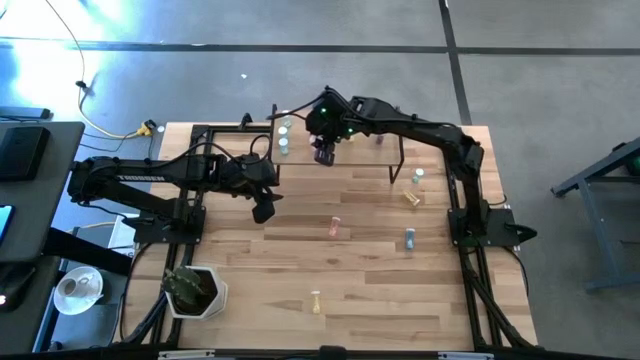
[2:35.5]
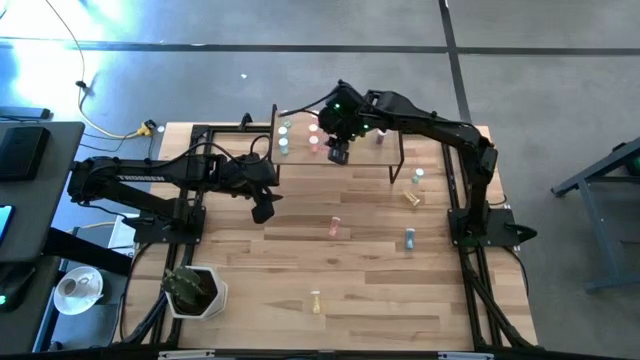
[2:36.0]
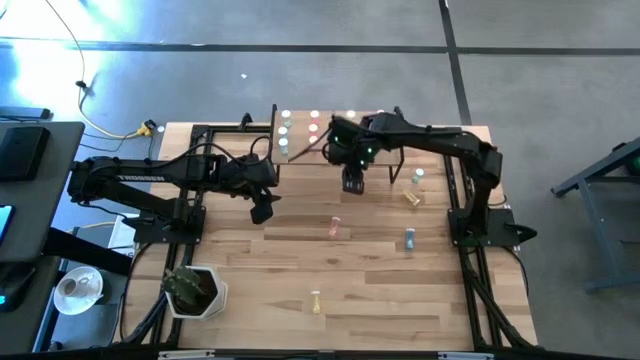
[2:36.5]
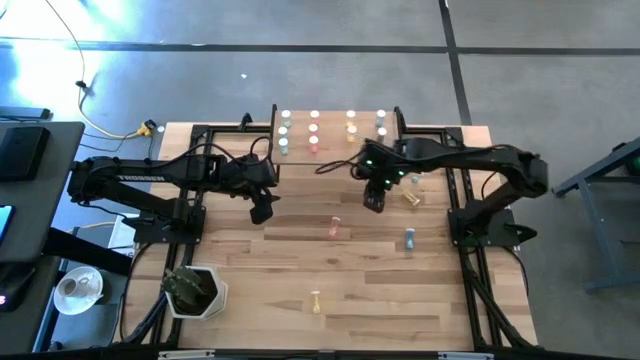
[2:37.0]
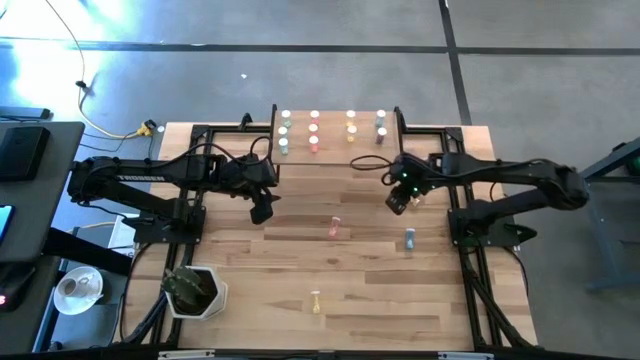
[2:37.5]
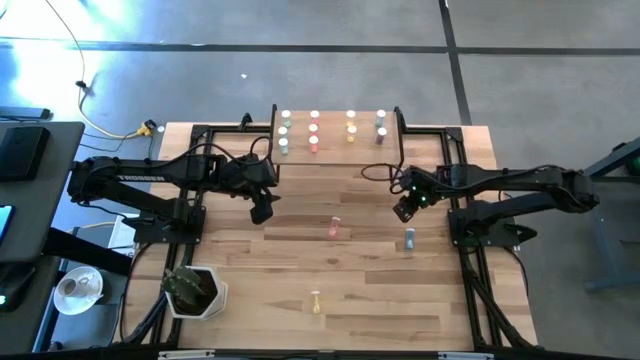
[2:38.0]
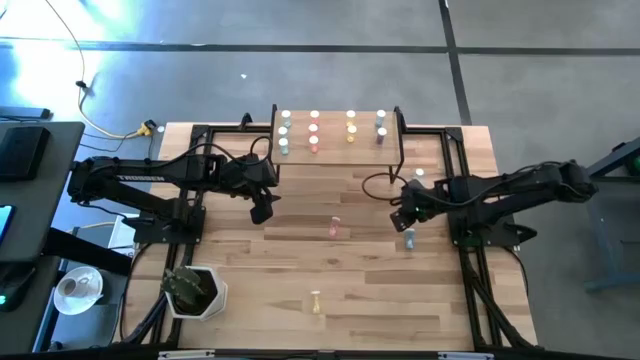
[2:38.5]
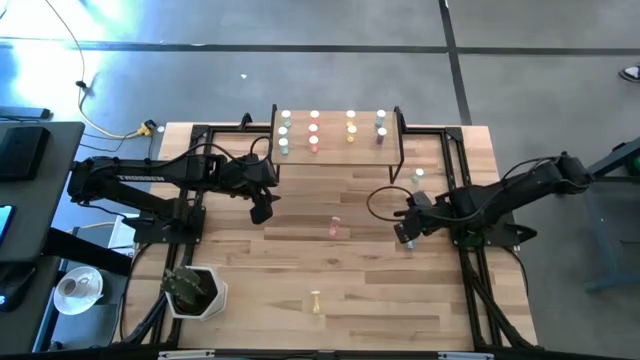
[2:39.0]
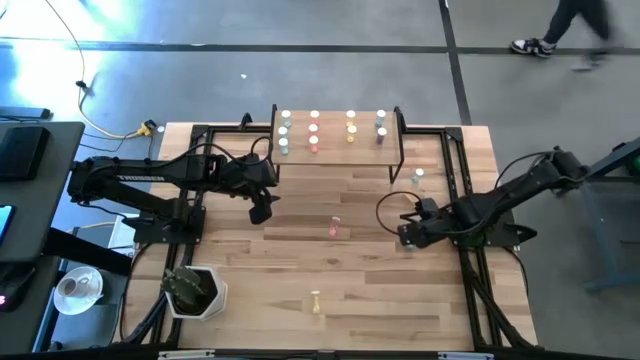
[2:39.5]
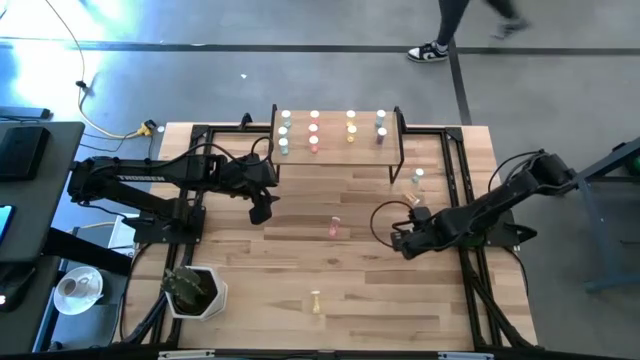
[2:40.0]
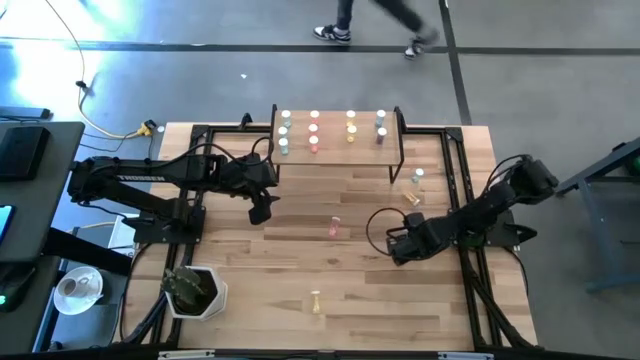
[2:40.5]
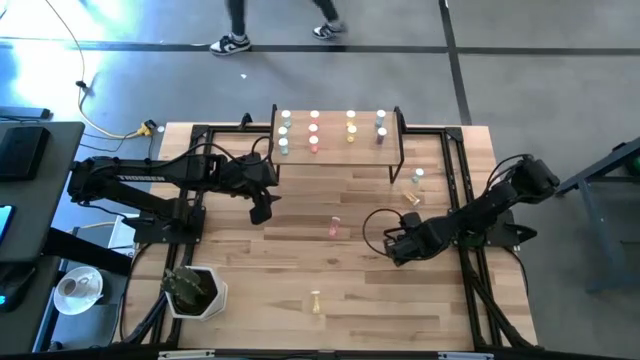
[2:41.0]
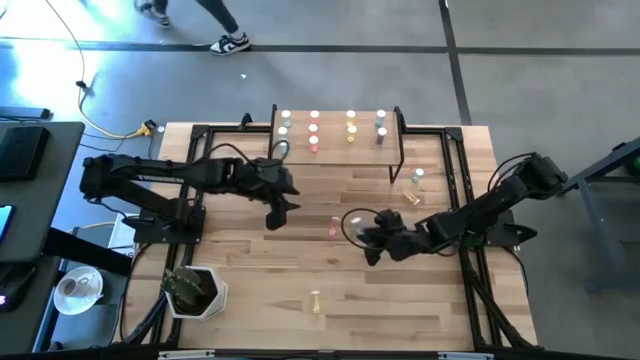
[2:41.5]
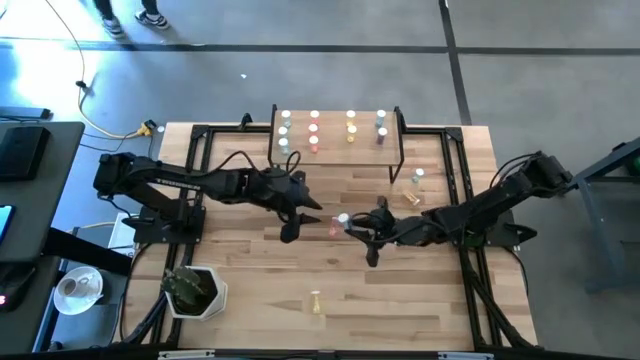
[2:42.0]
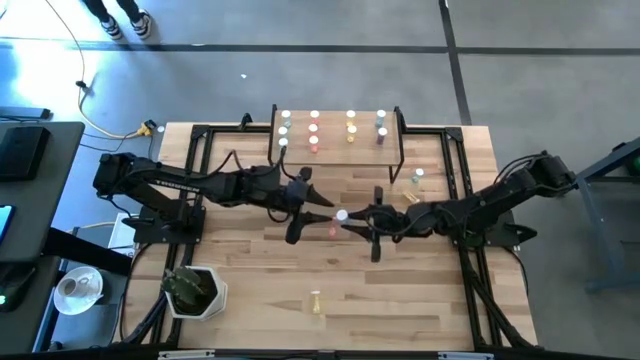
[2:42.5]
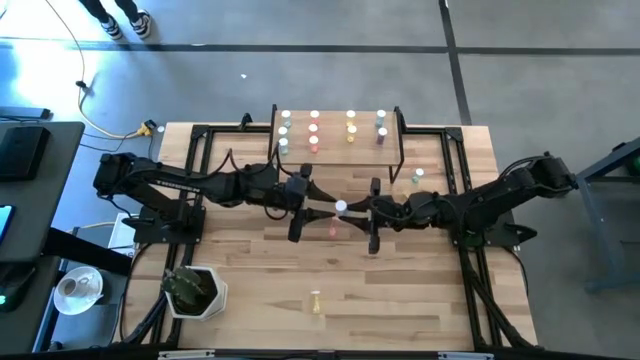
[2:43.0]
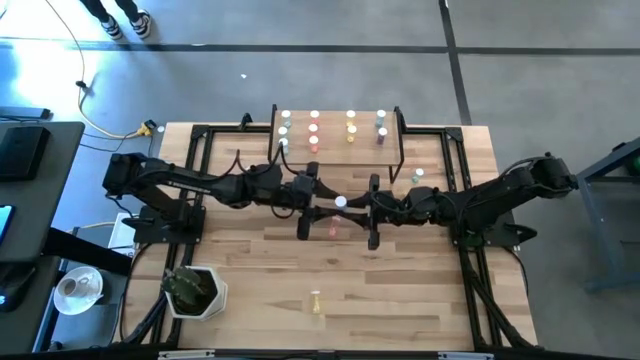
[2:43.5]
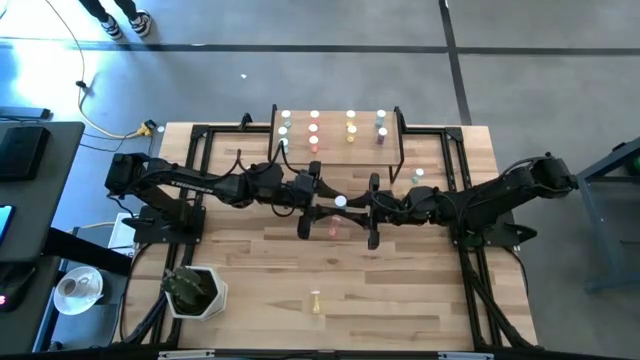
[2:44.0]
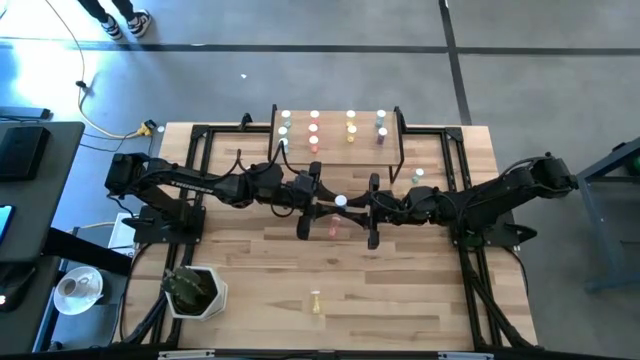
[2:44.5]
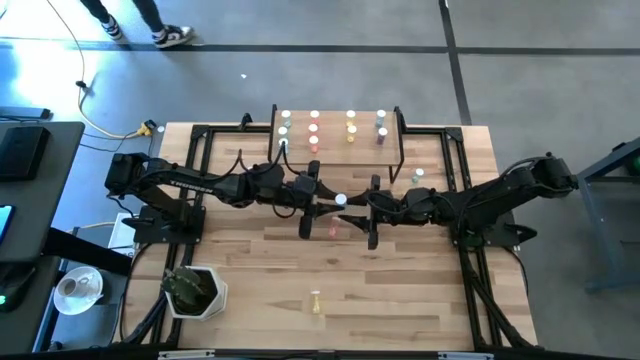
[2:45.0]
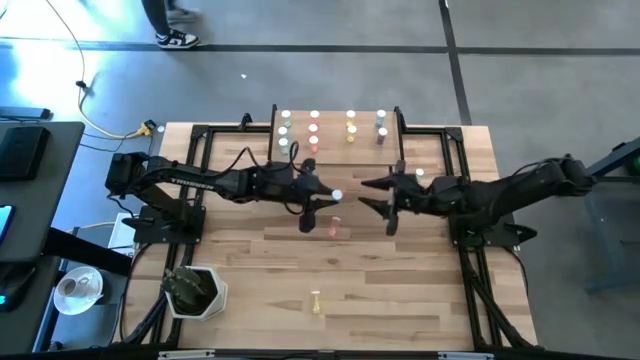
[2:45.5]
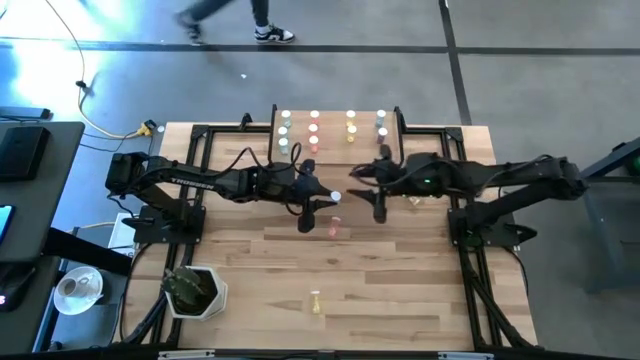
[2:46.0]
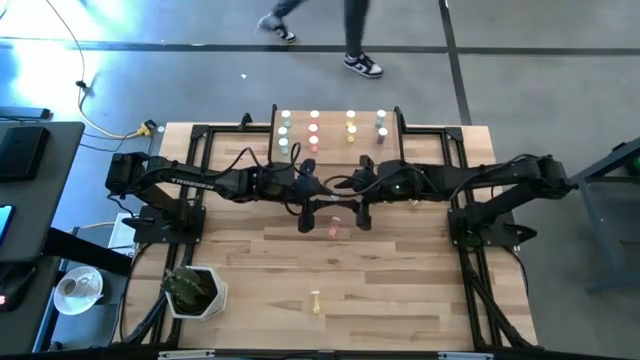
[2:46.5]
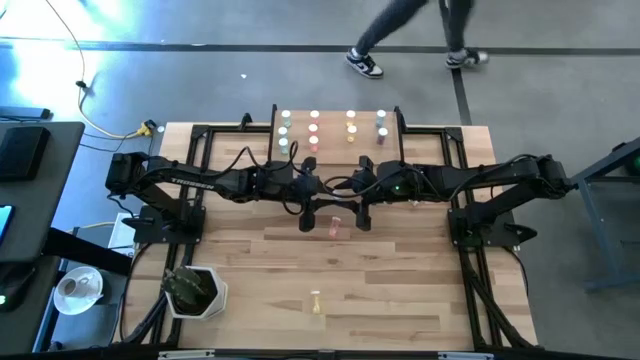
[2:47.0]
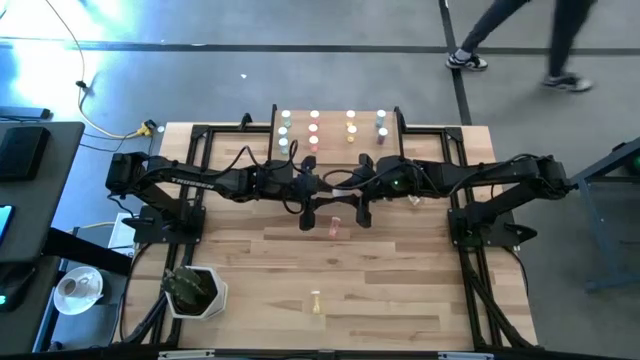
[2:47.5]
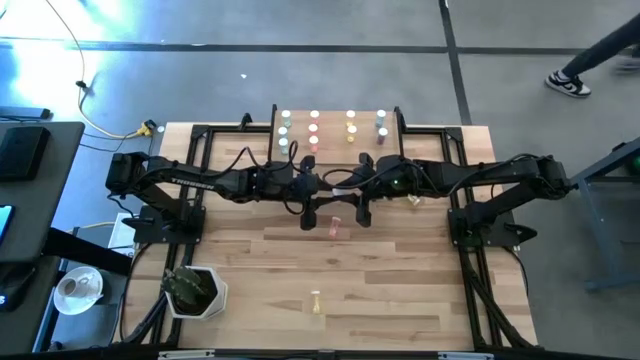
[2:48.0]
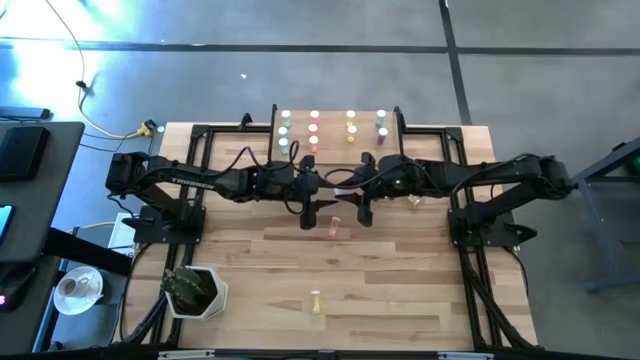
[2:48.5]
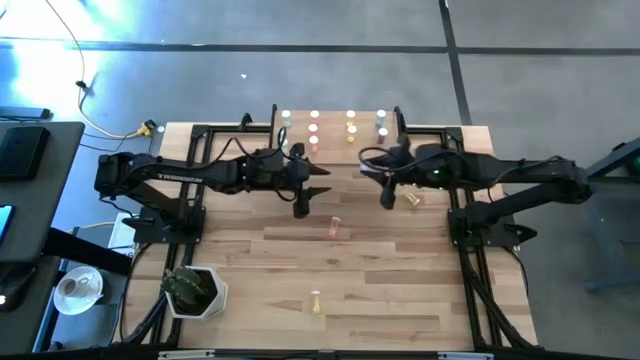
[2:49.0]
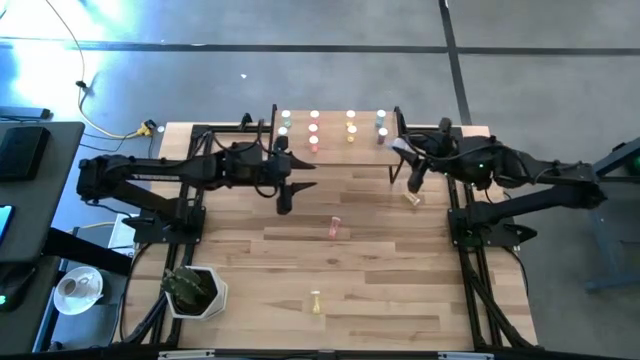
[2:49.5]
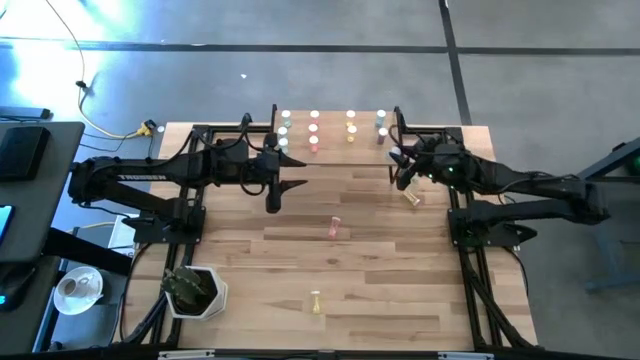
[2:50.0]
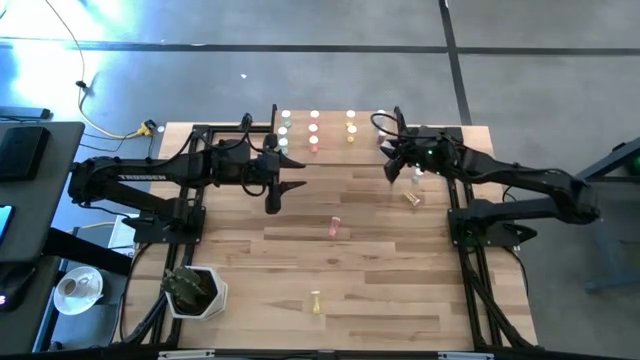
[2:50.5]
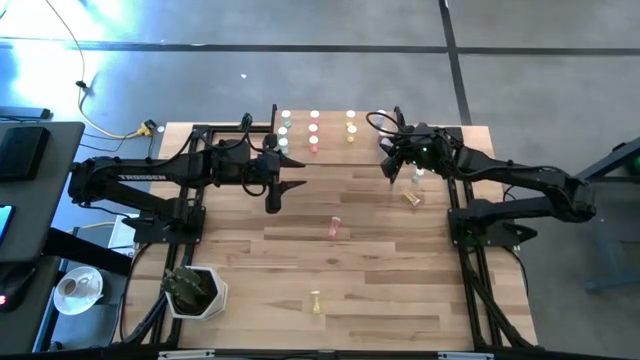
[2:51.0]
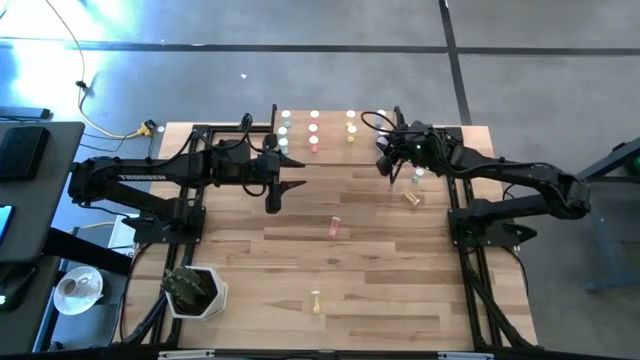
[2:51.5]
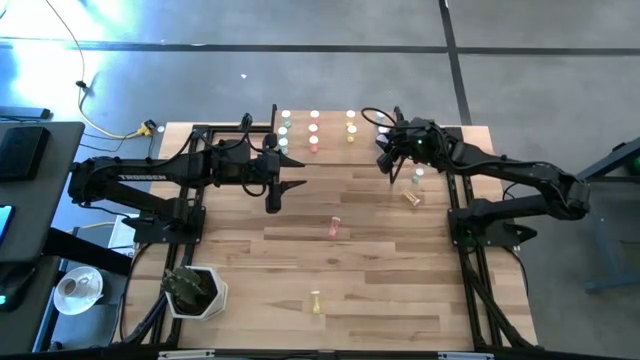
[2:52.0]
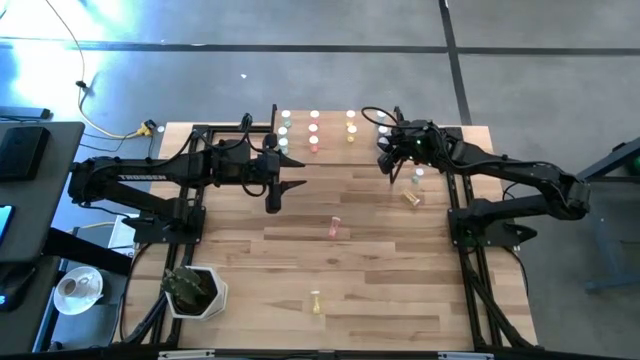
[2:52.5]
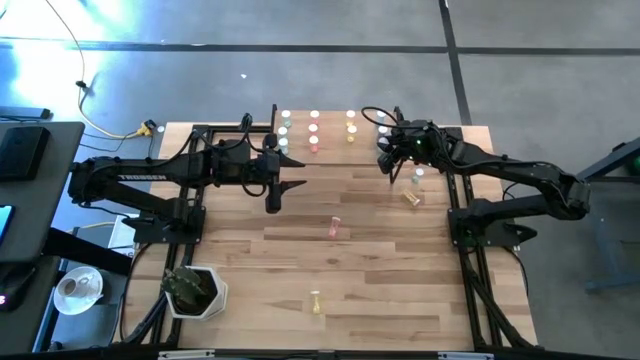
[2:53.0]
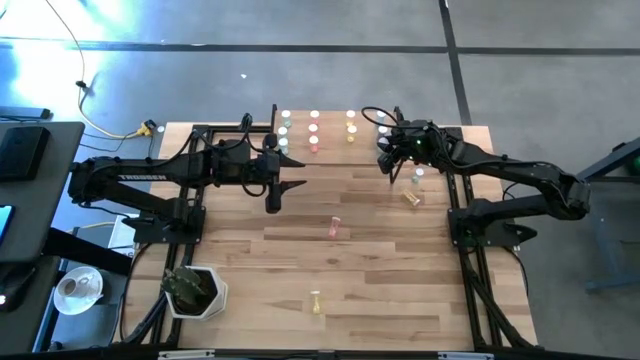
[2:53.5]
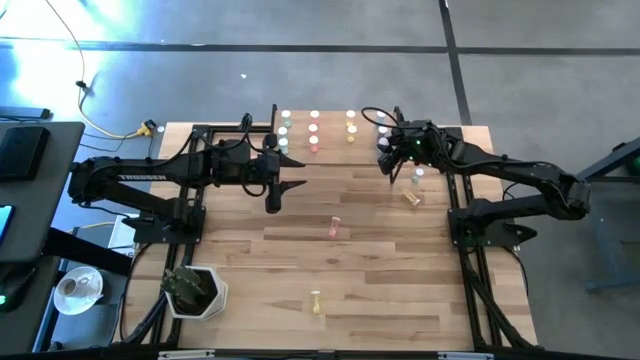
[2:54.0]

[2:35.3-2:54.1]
Task: Pick and place medicine bottles onto shelf by color
Put the blue pill bottle on the shelf

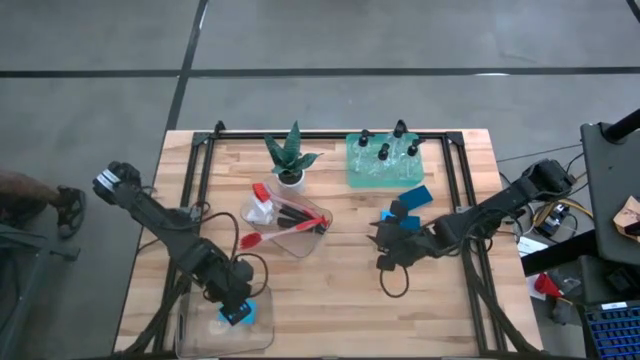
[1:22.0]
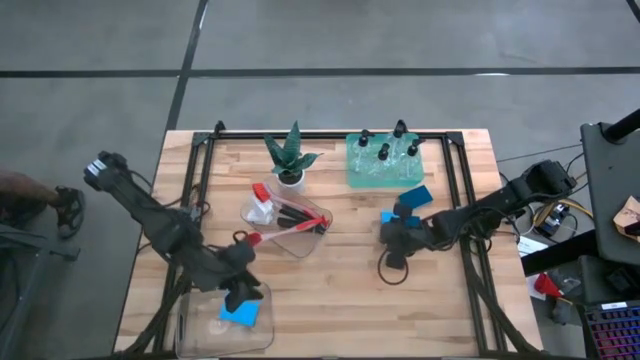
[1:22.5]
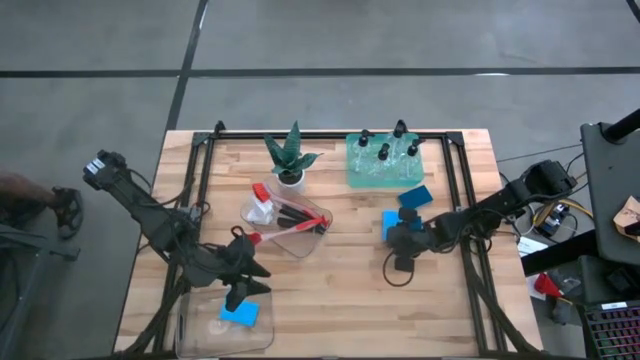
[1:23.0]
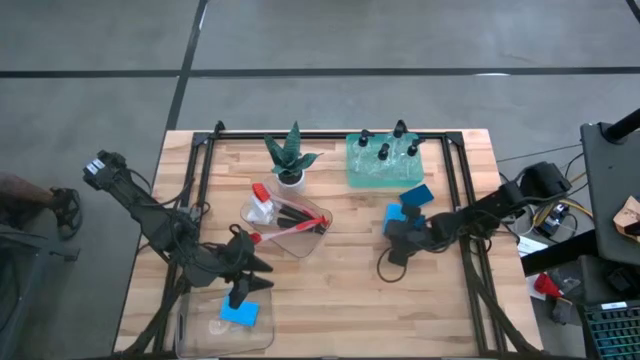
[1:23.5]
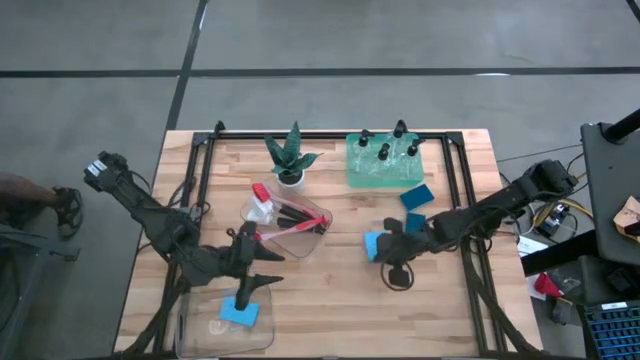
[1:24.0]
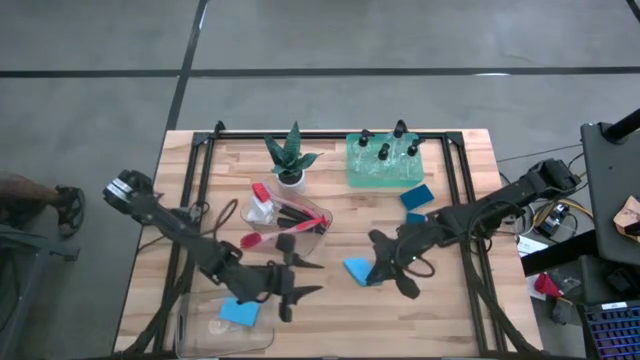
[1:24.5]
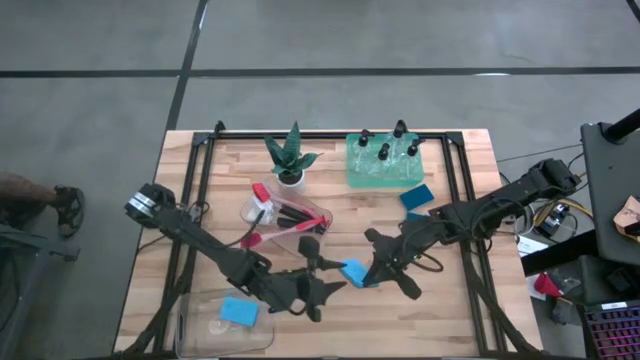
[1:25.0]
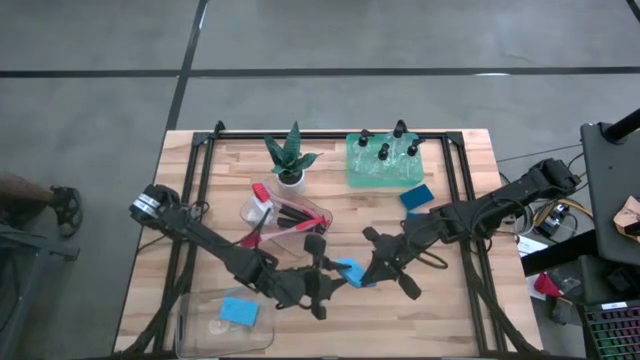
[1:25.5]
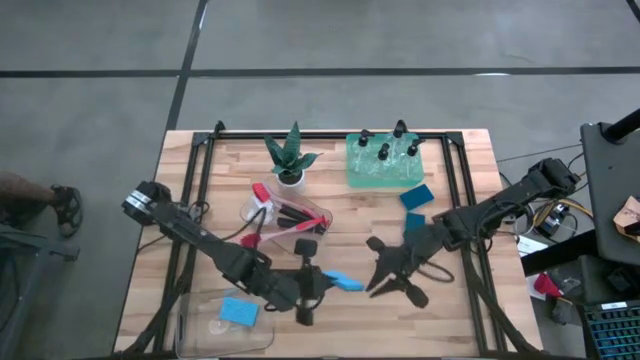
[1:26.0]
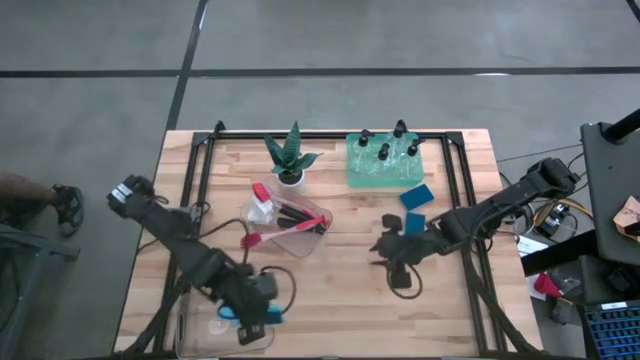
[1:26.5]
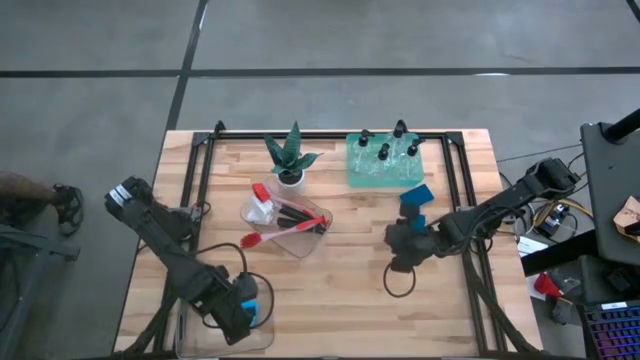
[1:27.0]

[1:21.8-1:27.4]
Task: Pick & Place Kitchen Sink Supplies
Put the blue sponge into the bottom transparent bin
